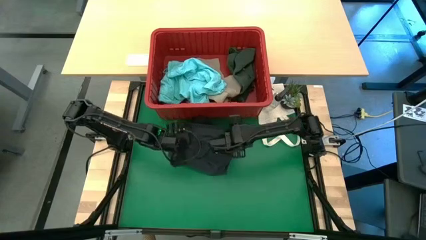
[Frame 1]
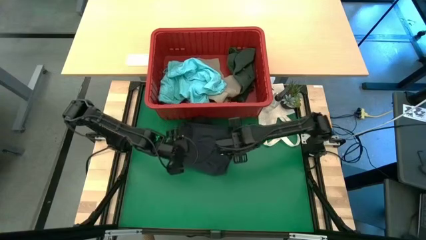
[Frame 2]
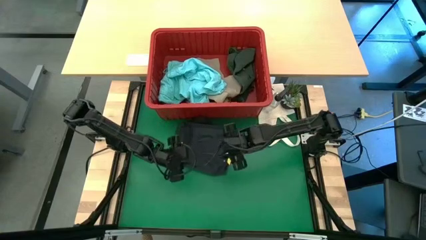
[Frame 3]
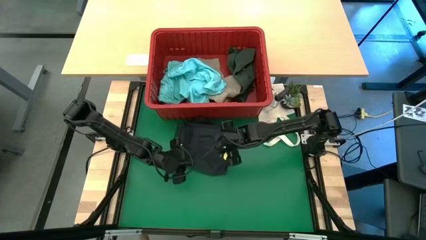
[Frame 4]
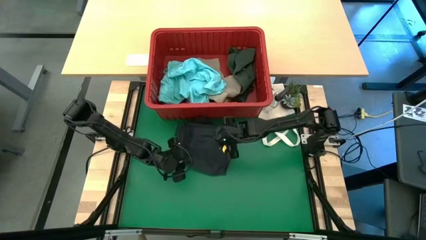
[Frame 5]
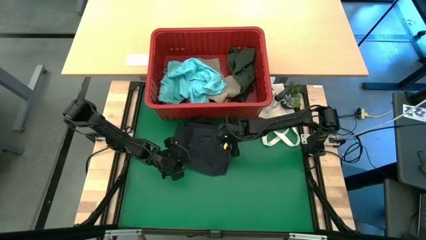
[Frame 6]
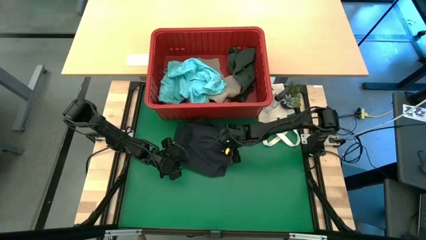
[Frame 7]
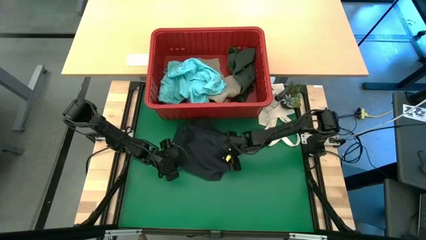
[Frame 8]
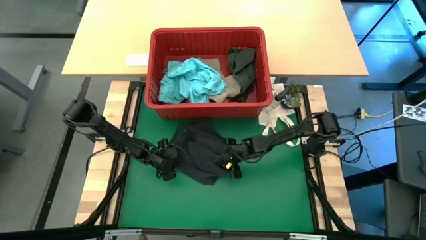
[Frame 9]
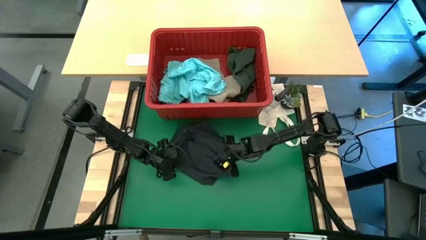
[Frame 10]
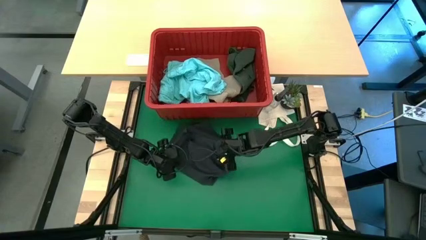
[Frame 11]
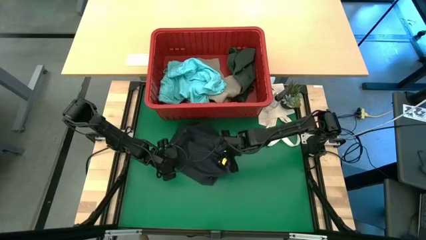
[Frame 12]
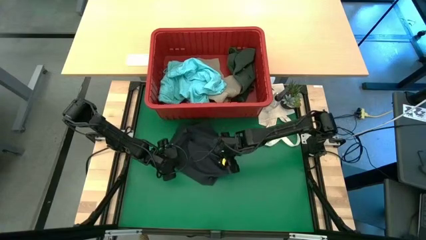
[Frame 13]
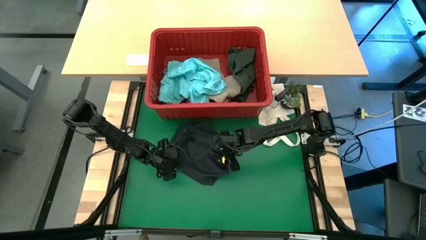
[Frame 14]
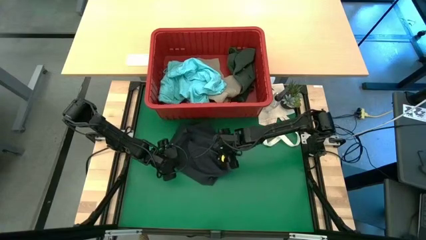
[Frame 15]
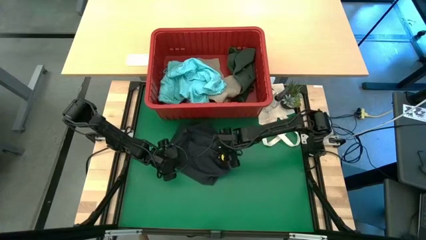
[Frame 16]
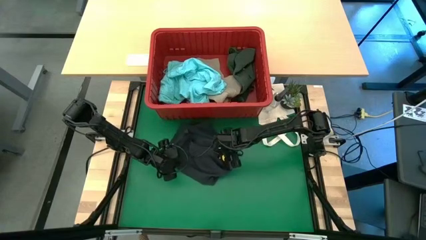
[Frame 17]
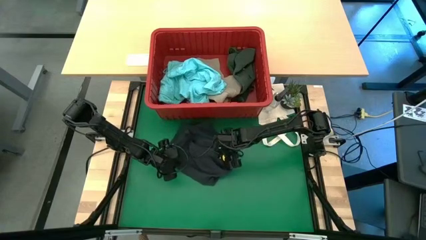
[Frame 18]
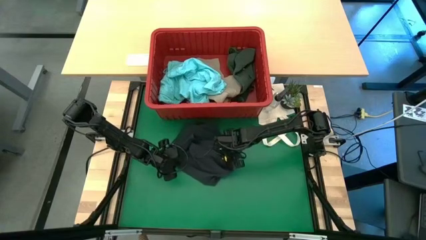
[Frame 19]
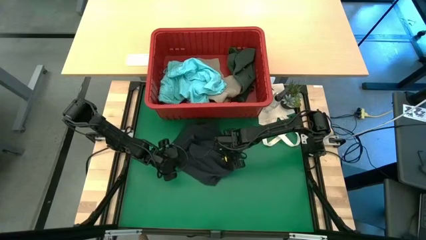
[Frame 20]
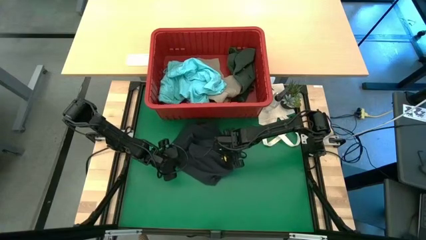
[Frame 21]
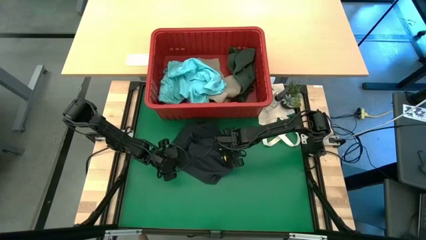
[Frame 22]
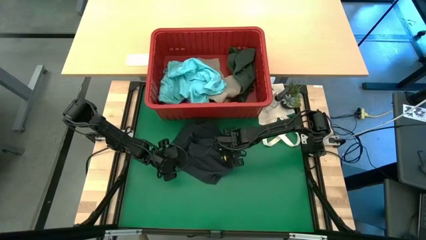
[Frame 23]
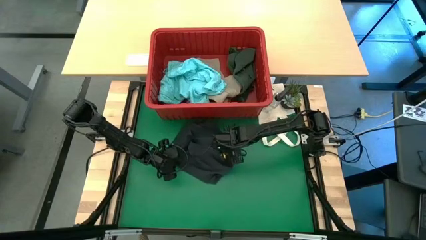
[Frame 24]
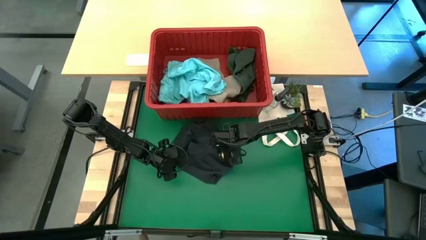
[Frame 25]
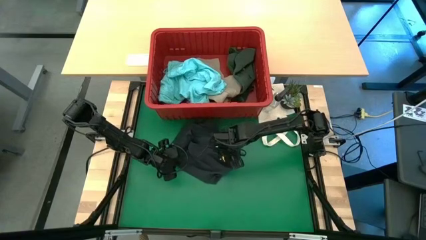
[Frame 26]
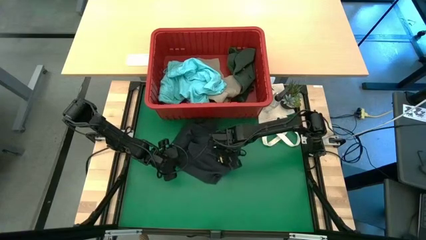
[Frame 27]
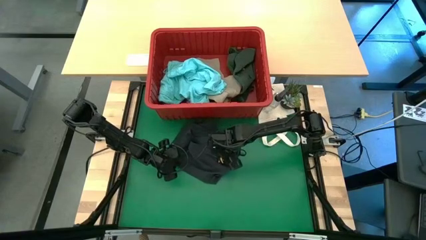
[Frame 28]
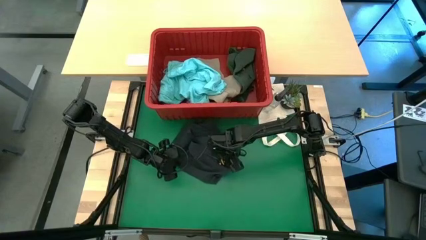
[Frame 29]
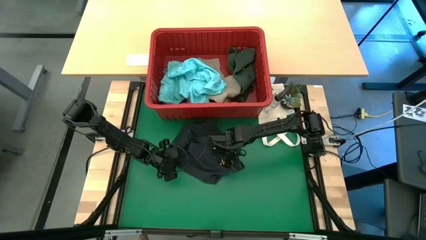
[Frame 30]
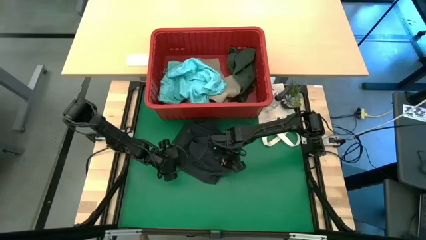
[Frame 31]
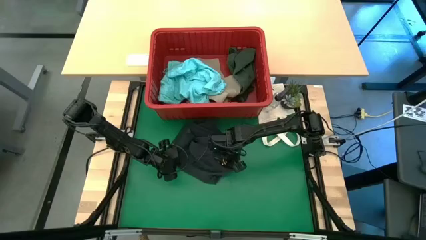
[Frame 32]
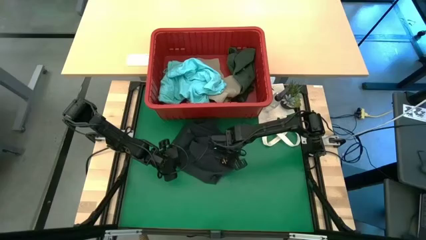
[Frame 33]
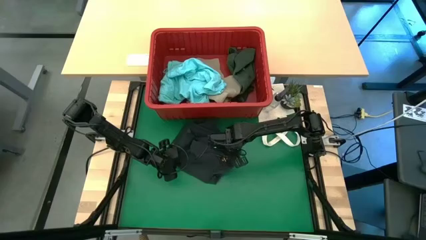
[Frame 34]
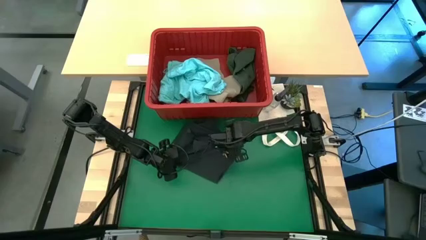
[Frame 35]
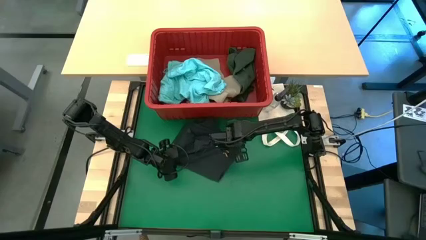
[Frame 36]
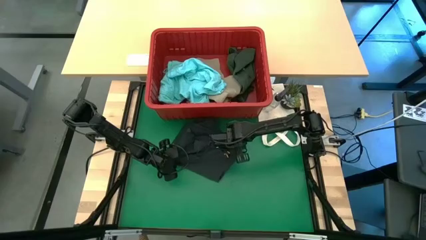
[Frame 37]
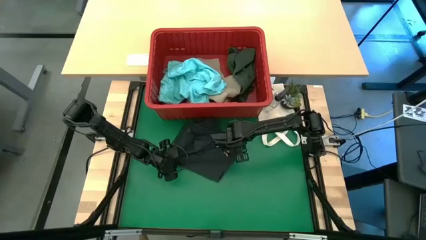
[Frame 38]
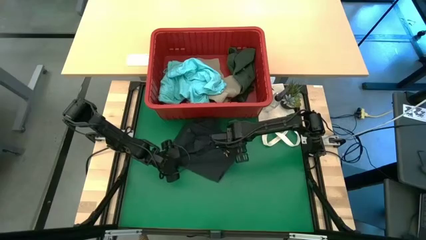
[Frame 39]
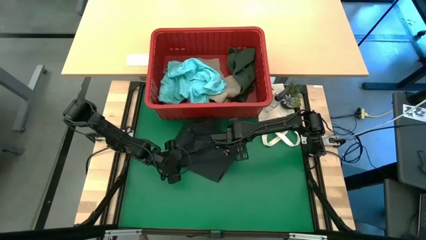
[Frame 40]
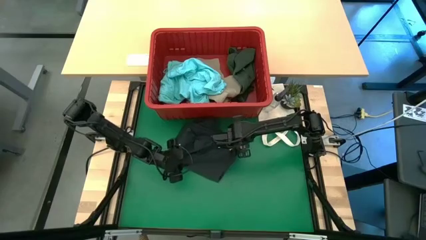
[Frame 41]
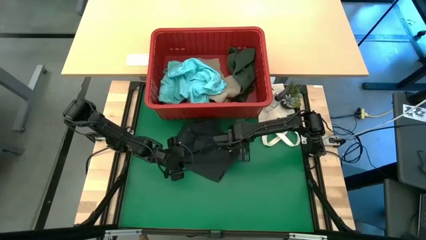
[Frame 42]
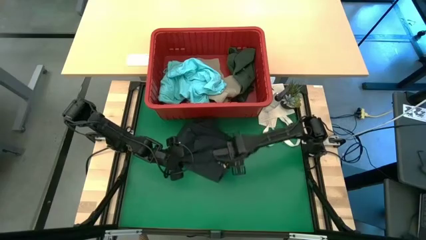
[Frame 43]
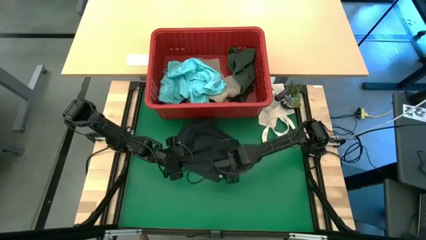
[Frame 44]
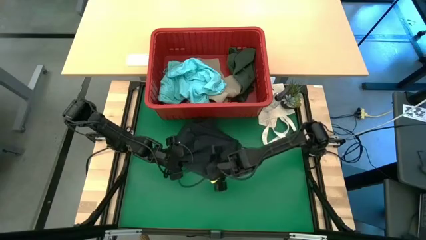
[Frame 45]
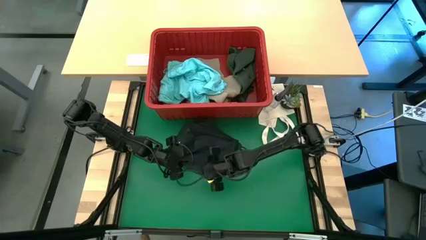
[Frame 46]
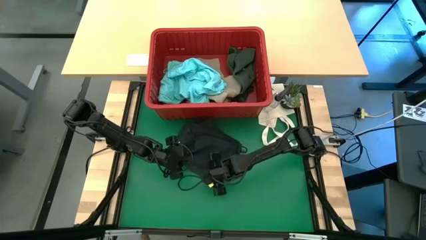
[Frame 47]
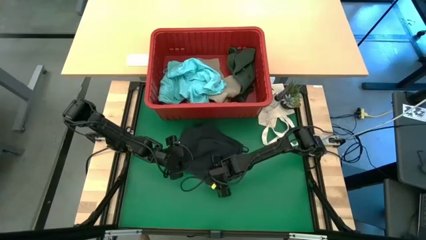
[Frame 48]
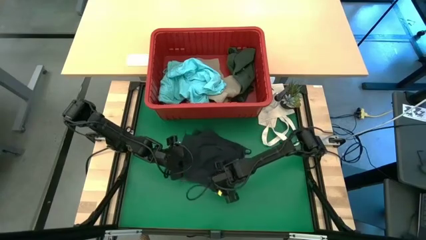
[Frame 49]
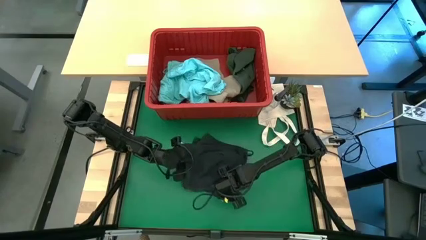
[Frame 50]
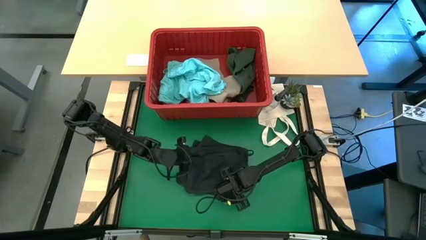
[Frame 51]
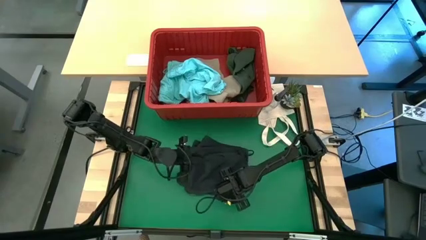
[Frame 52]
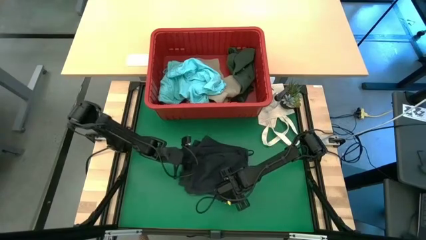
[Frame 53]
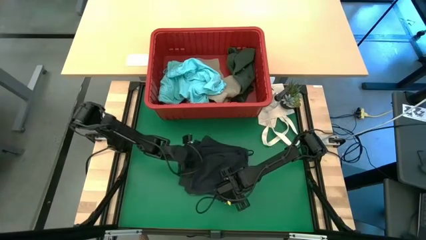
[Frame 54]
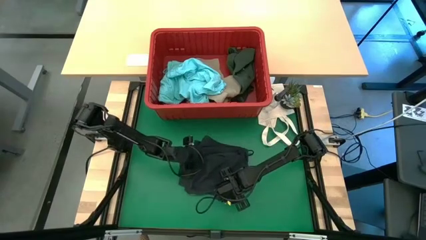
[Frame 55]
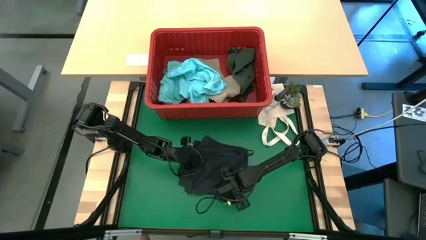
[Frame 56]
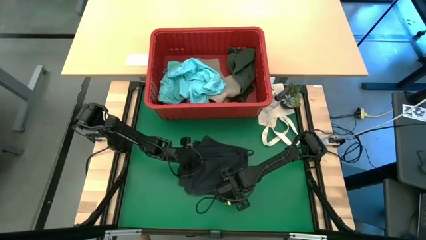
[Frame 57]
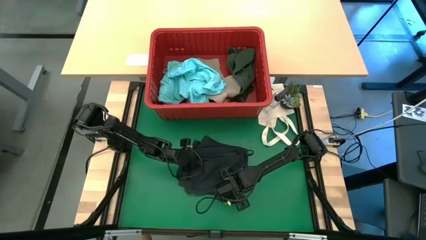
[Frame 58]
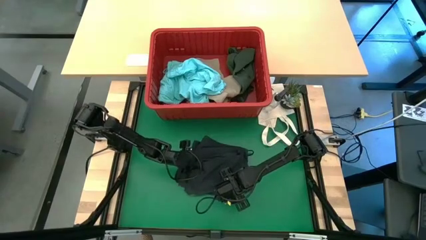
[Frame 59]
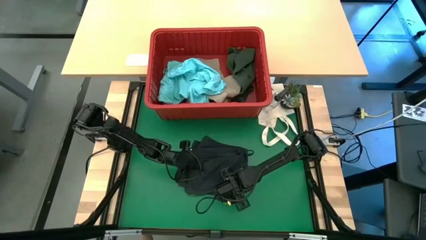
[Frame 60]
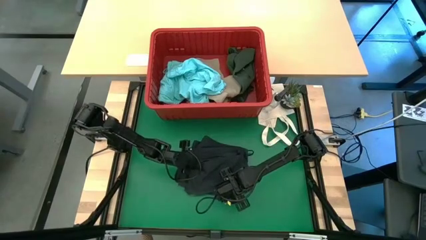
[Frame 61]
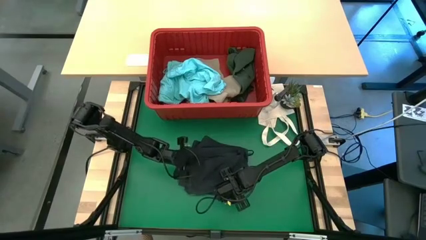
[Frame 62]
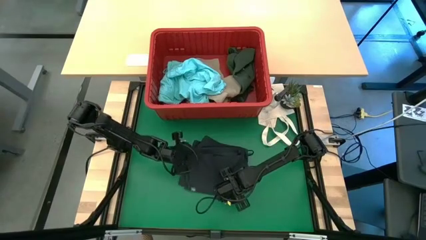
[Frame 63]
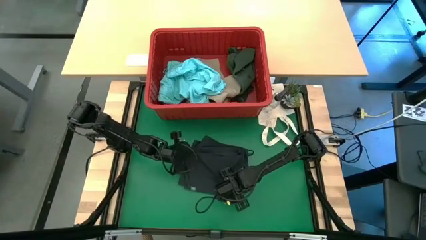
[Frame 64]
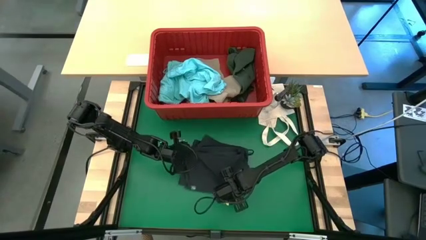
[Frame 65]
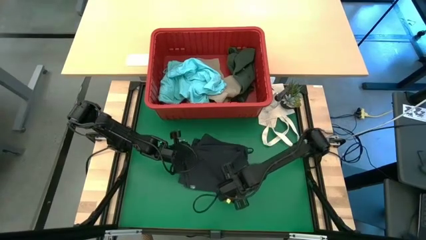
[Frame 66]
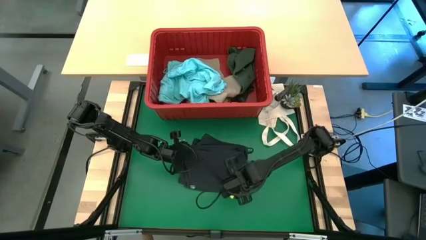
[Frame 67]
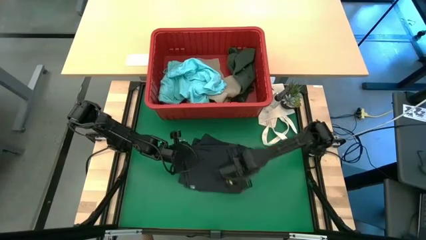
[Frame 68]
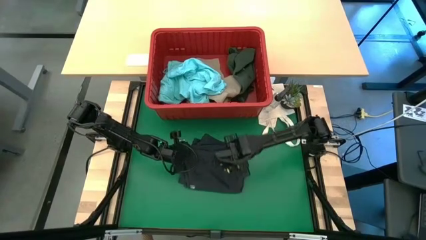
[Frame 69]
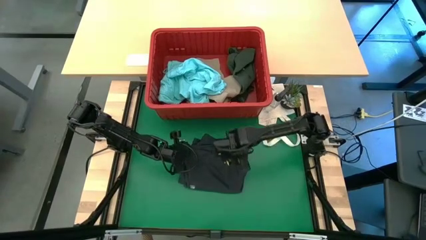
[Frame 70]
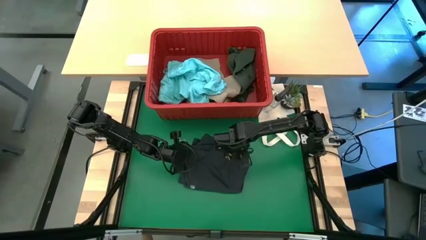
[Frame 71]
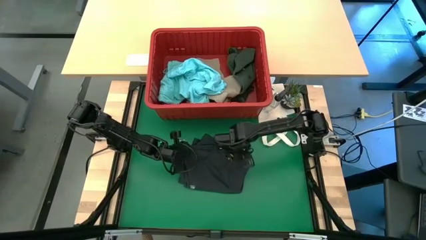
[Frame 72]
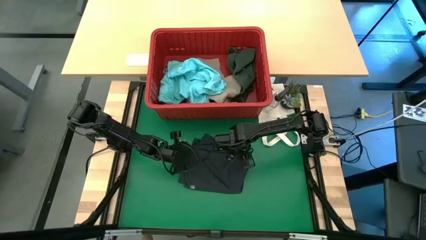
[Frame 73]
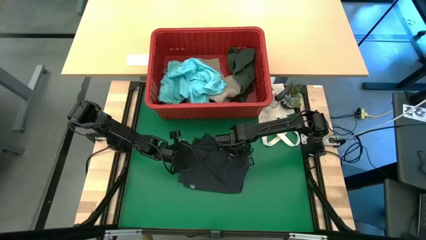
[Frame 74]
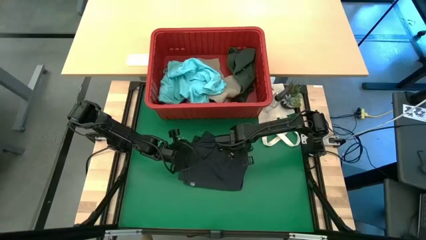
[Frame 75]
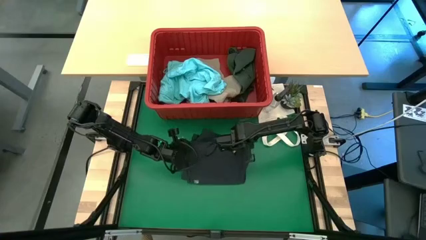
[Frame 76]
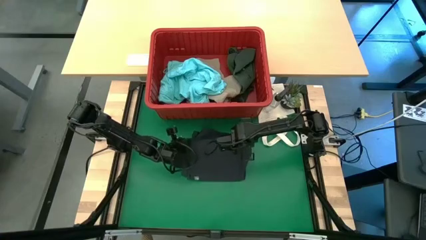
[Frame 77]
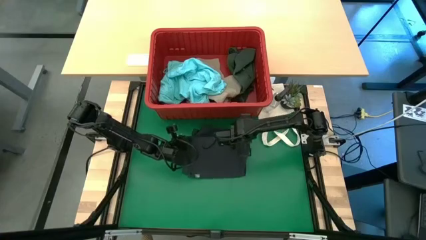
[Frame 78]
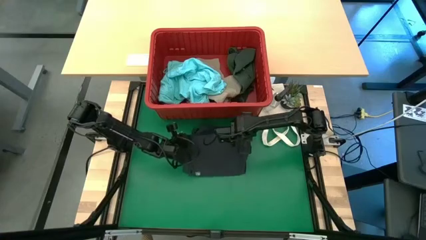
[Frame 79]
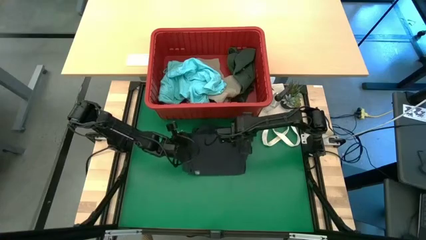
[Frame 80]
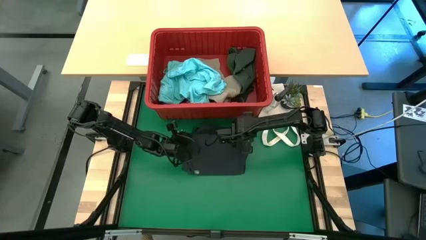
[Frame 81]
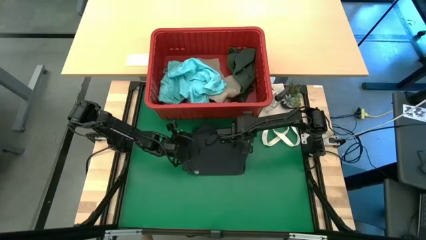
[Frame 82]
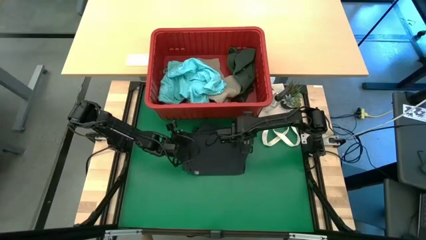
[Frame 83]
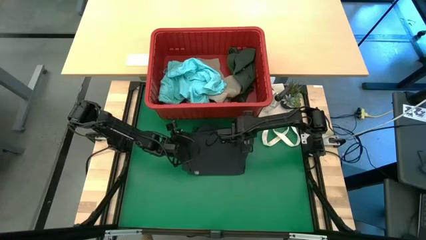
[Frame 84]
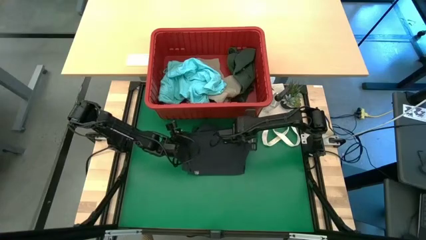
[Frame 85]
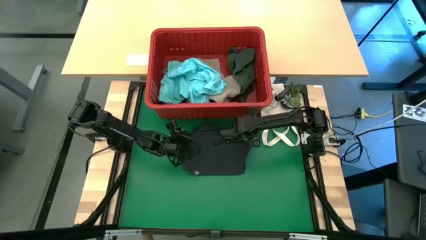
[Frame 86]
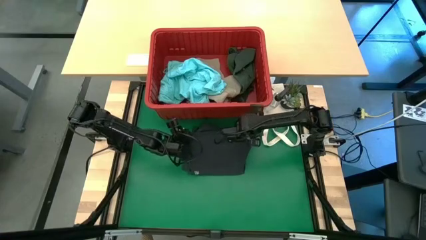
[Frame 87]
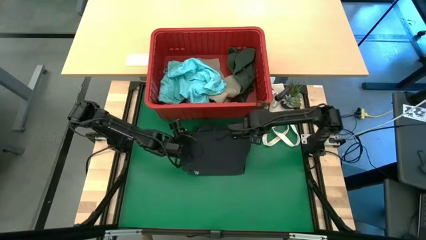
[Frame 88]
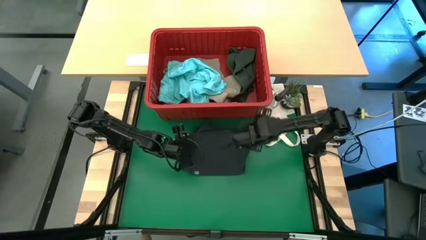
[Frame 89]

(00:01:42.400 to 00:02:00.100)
Task: Fold Laundry from Bin
Fold the black shorts from the red laundry bin
